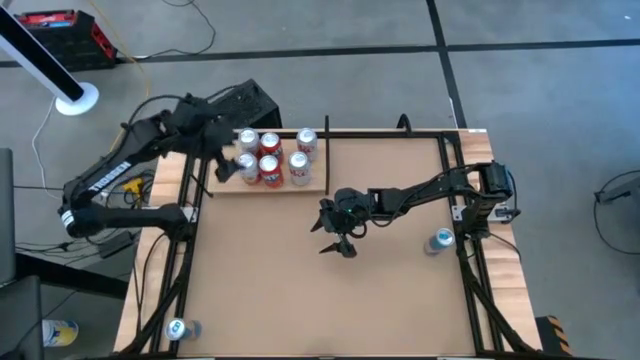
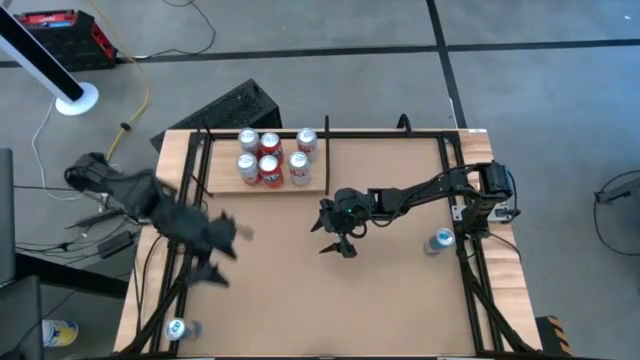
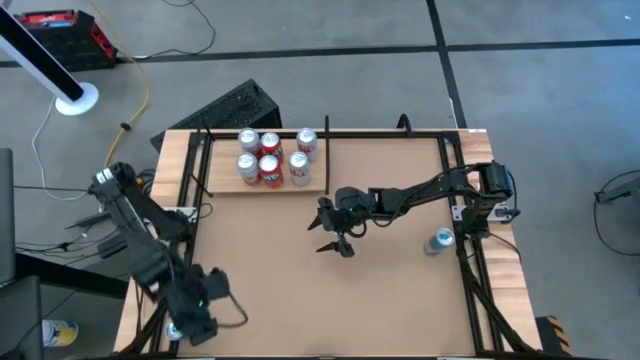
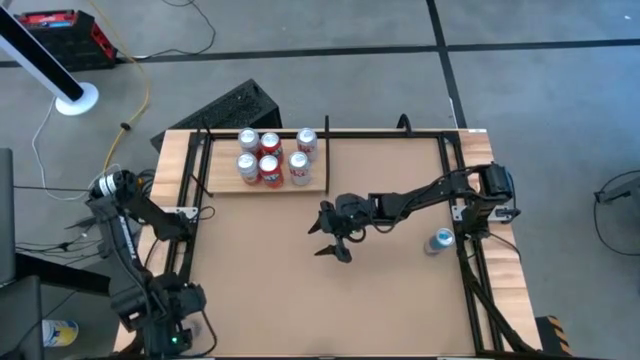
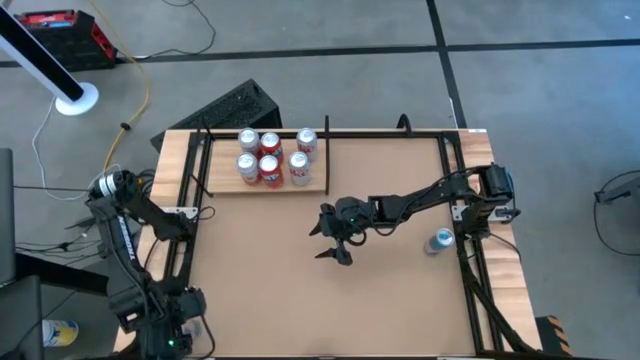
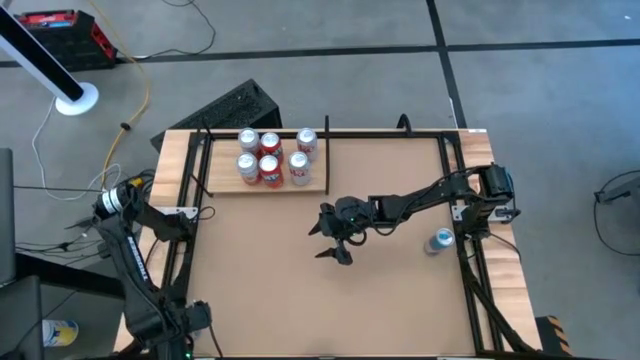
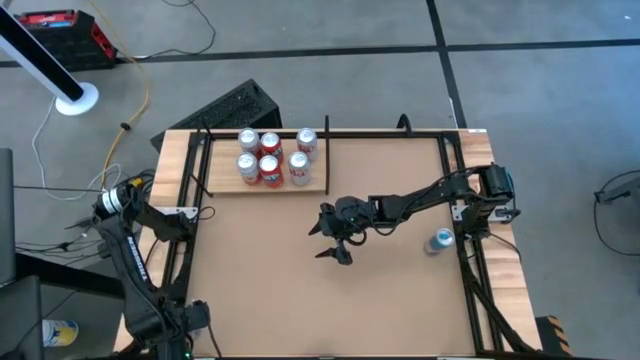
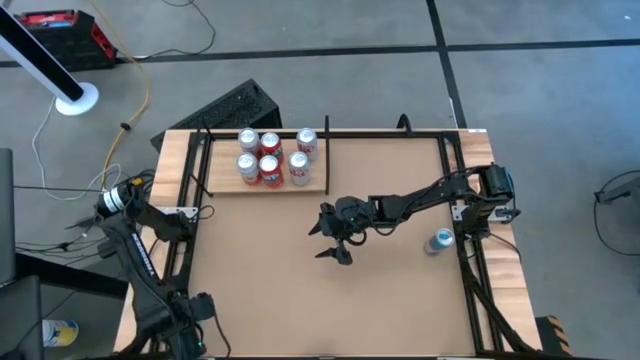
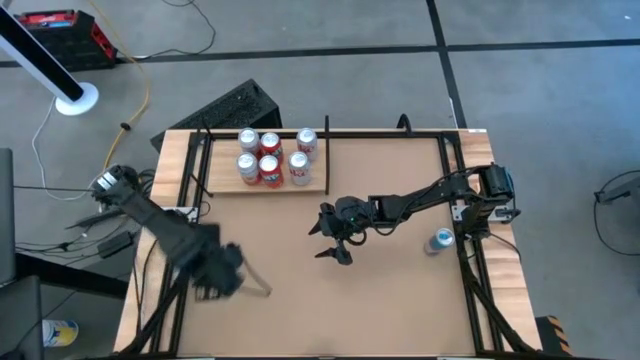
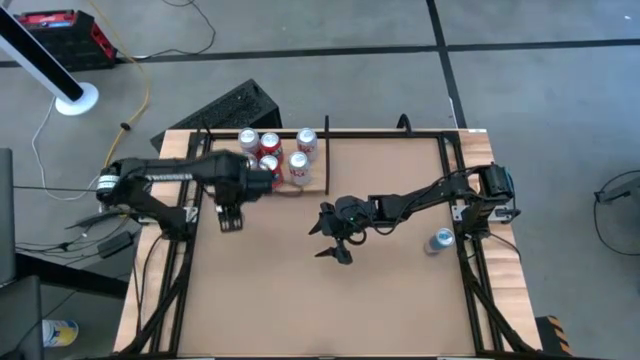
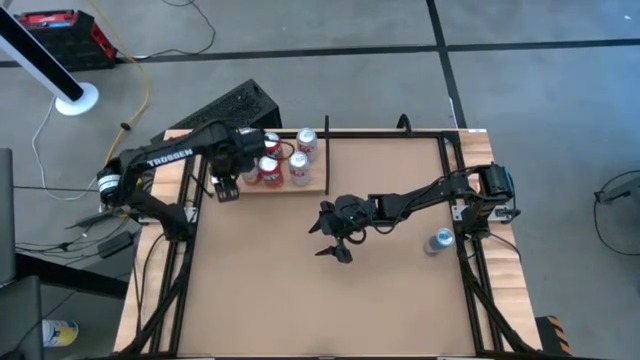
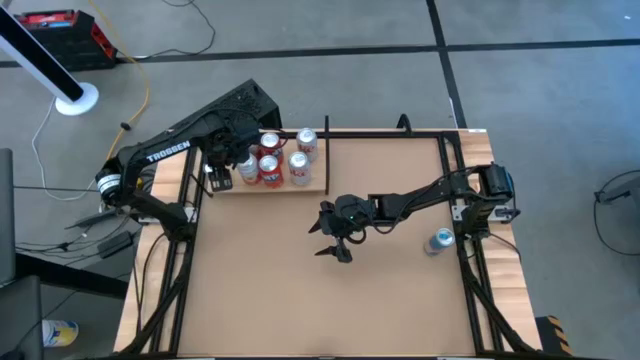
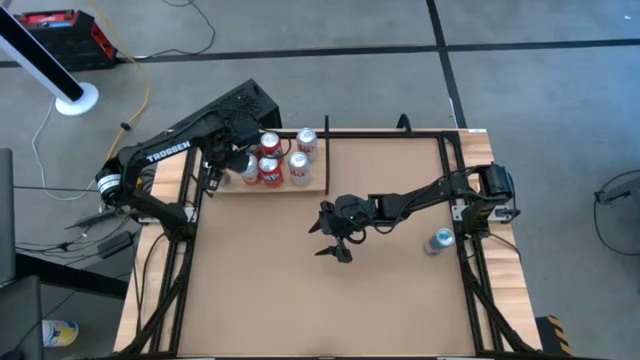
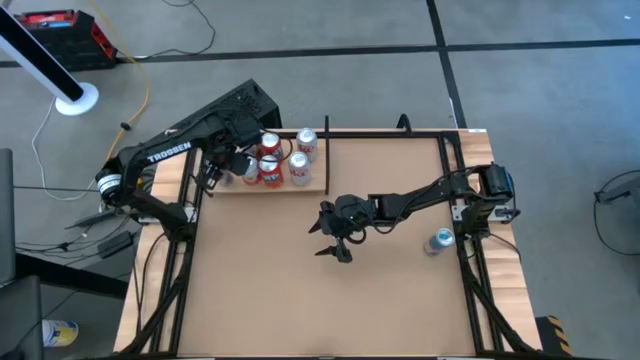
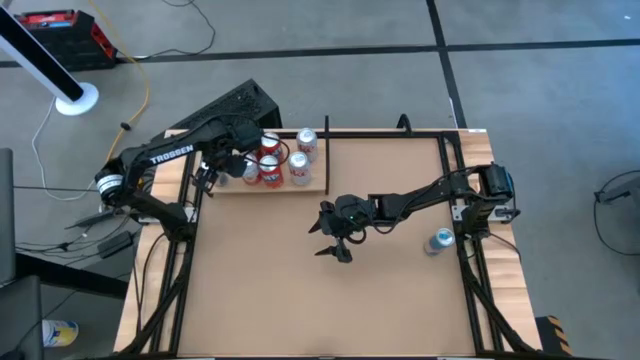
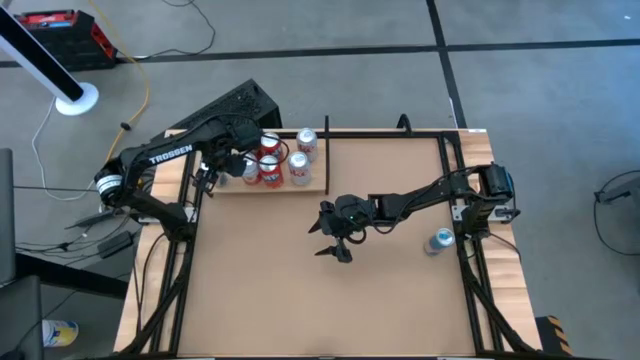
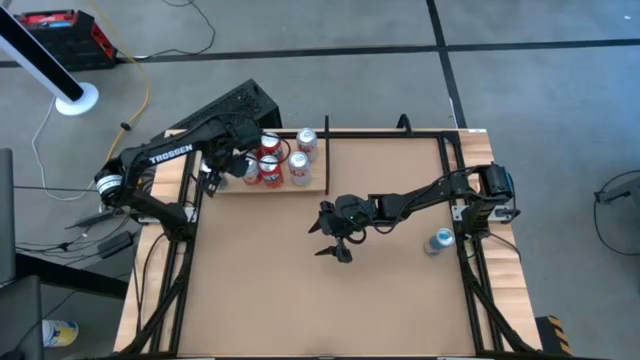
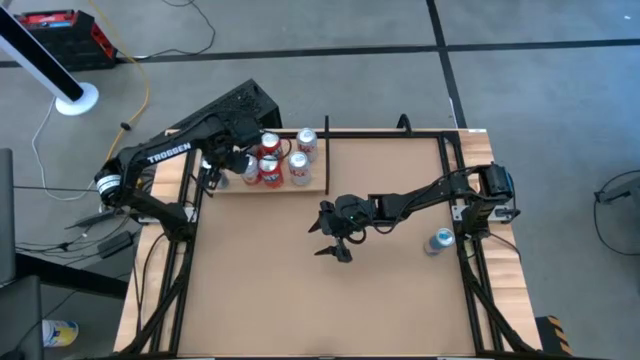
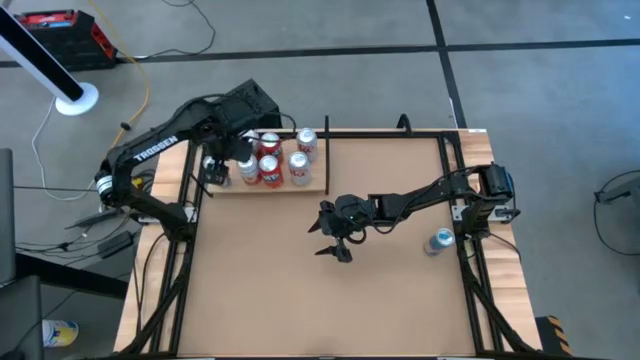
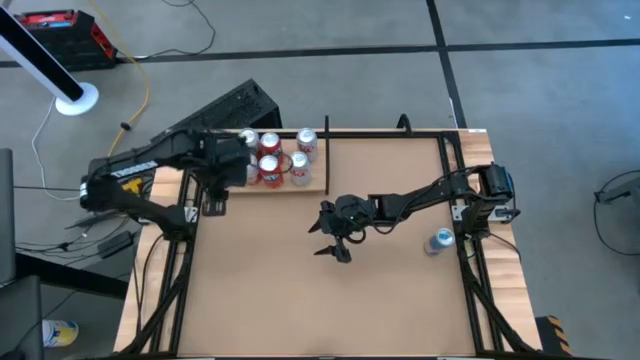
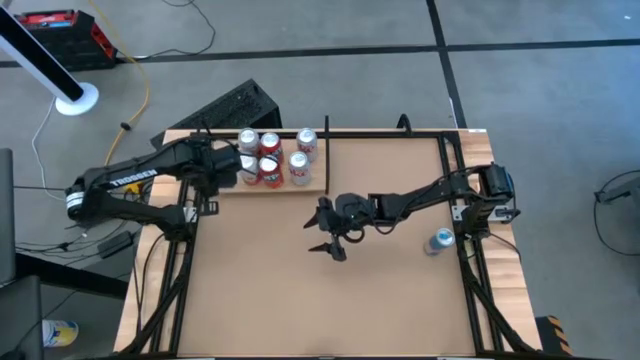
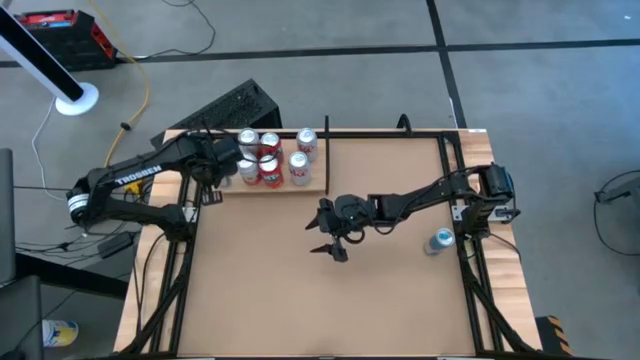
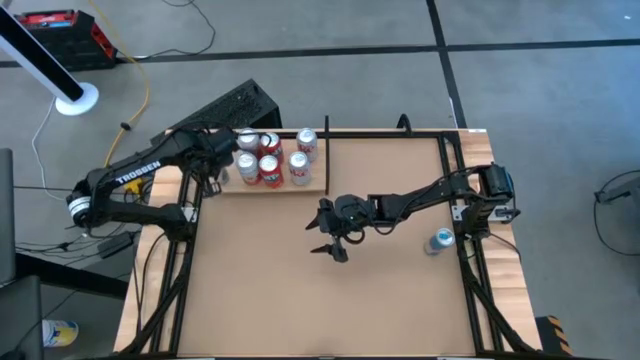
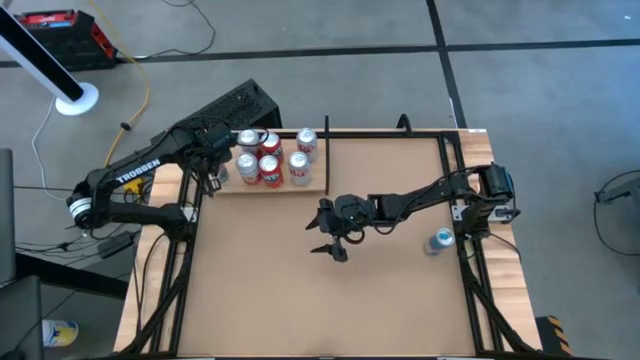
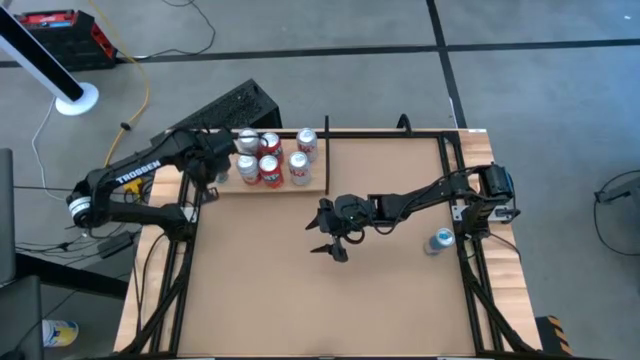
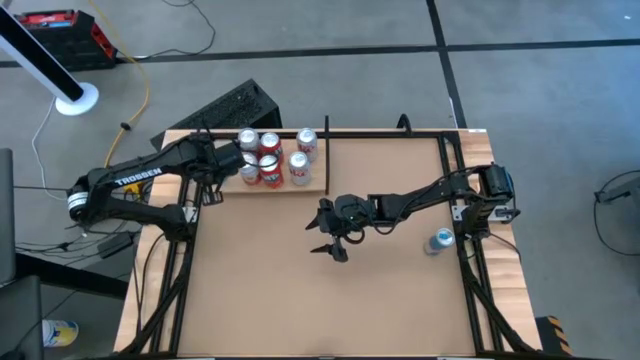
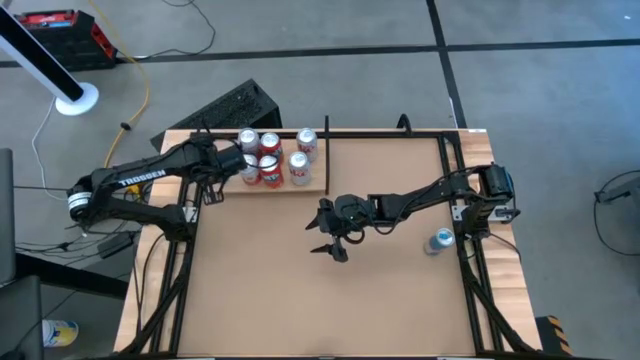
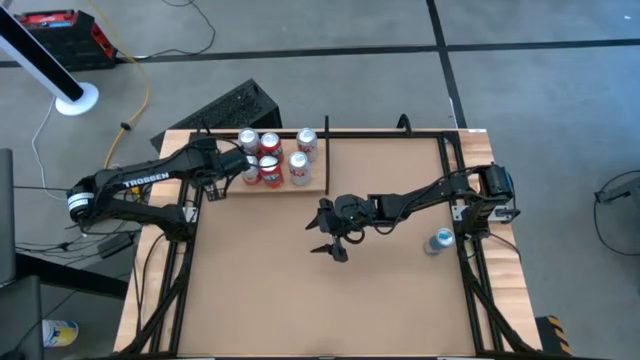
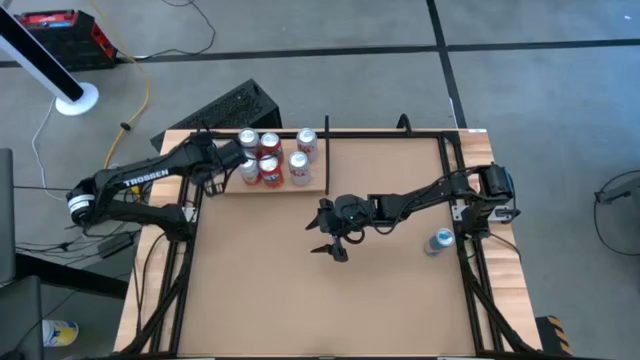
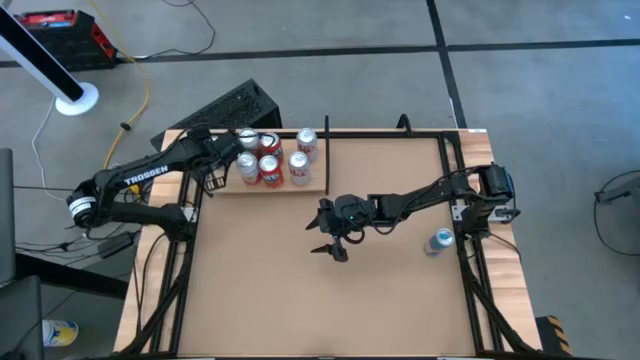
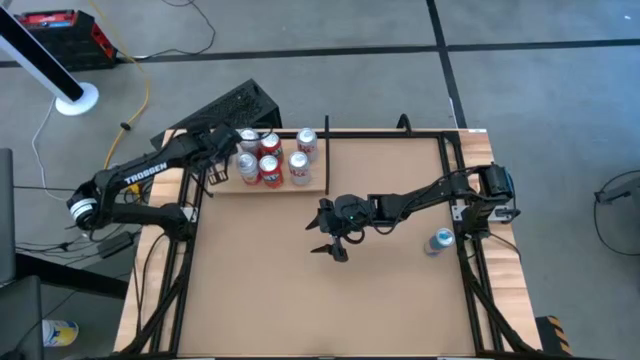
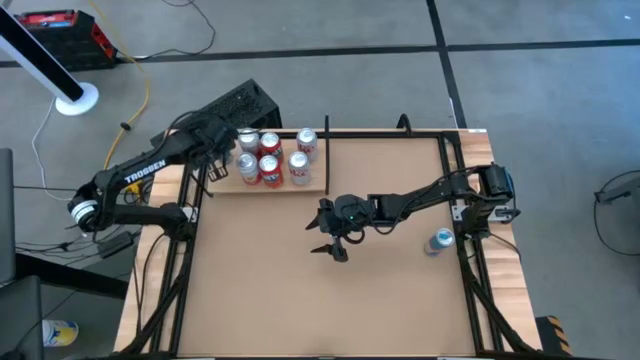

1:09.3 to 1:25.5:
Task: Place canned beverage on shelf
Put the bottom blue soda can on the shelf

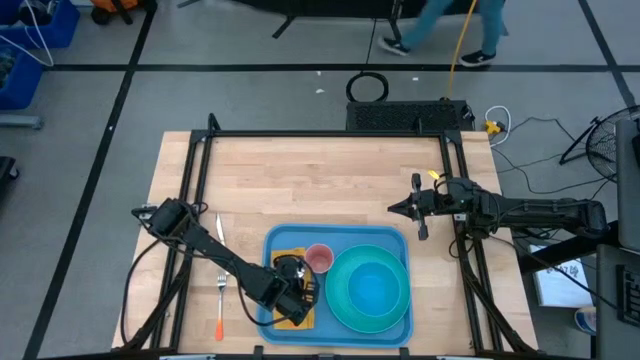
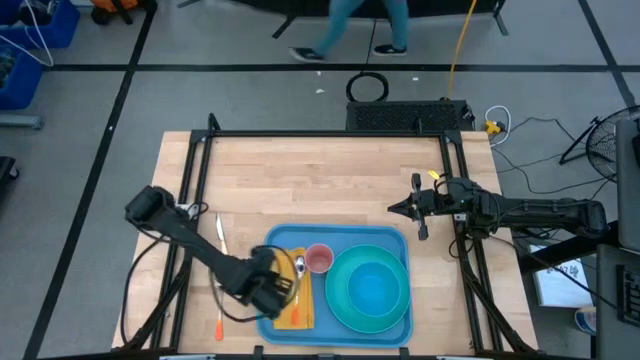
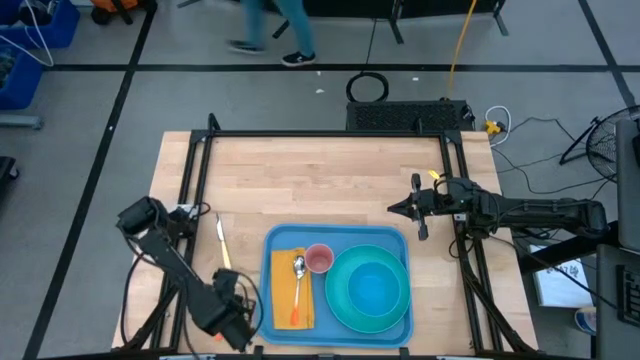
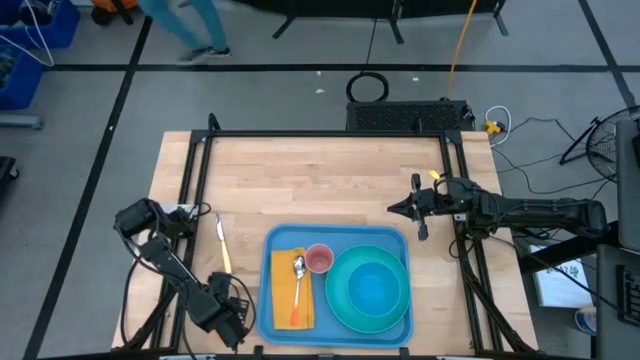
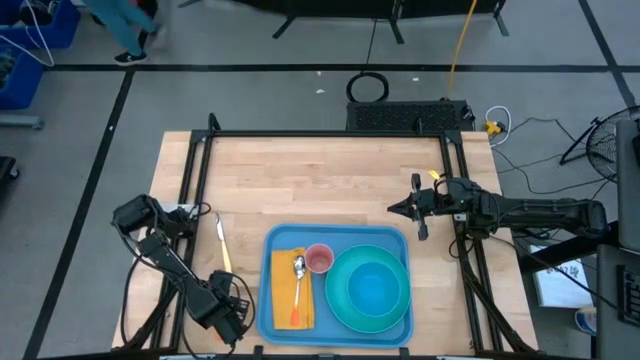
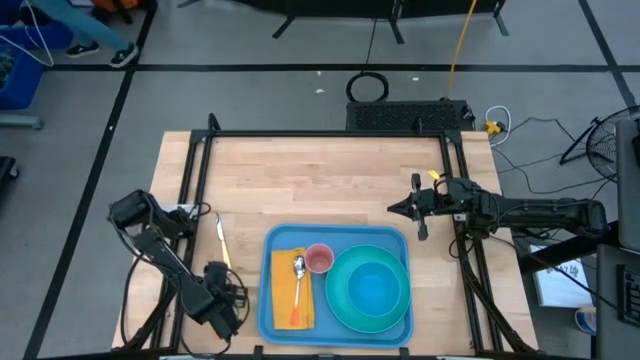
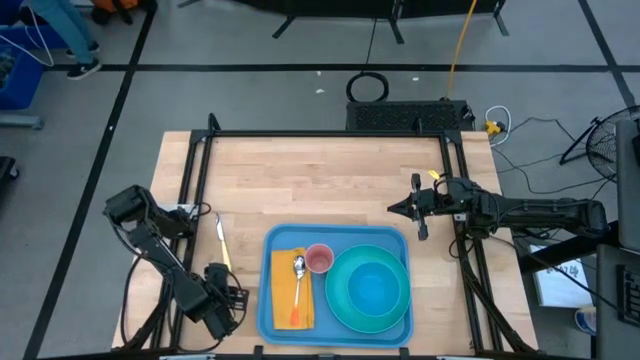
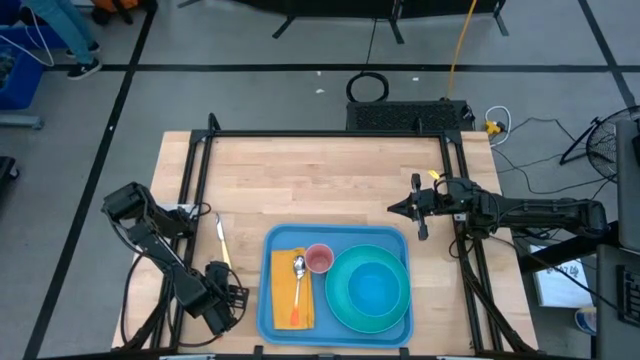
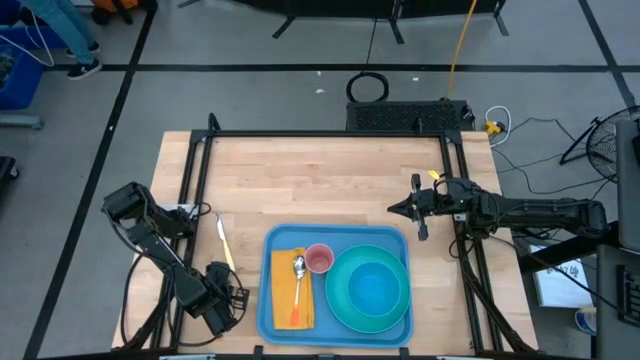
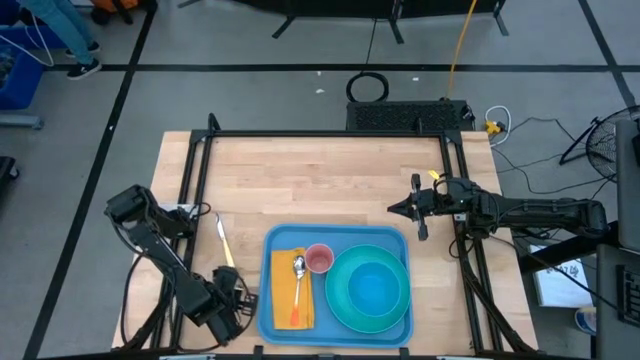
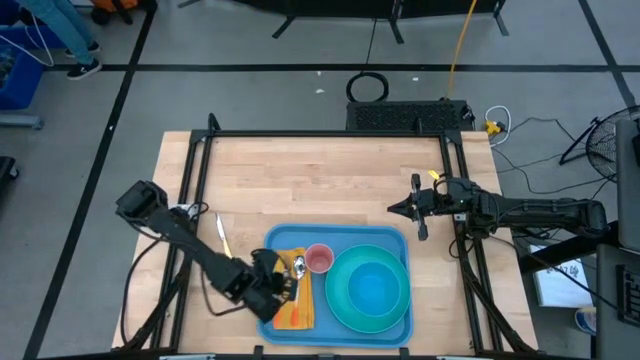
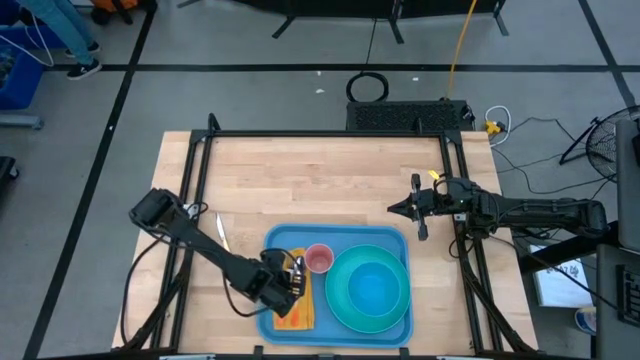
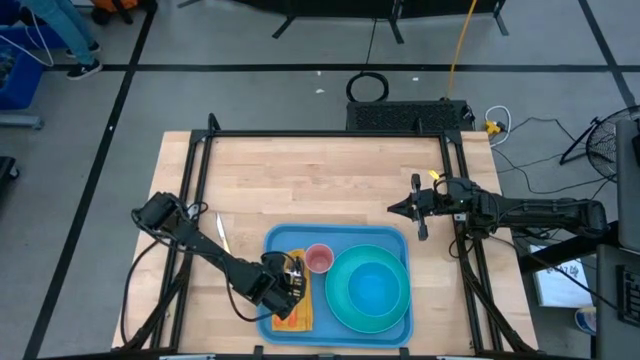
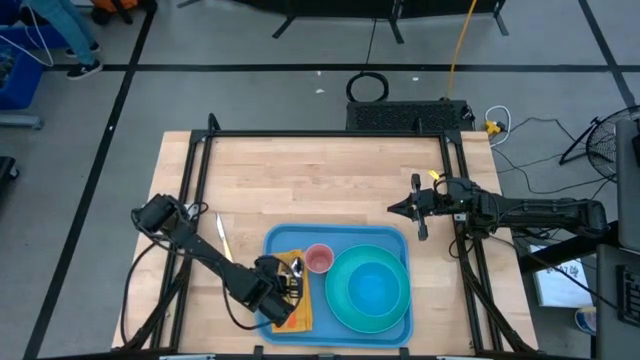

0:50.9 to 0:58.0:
Task: Set up tray
Put the orange fork on the yellow napkin to the left of the orange spoon
